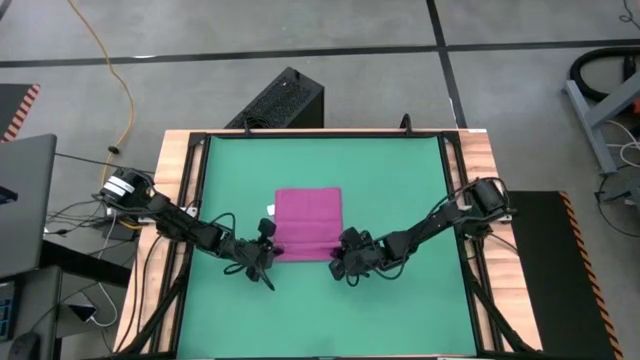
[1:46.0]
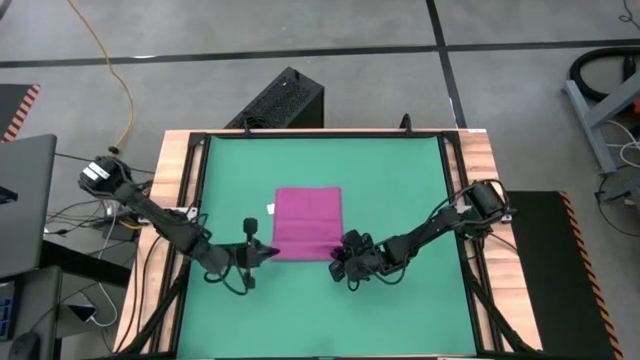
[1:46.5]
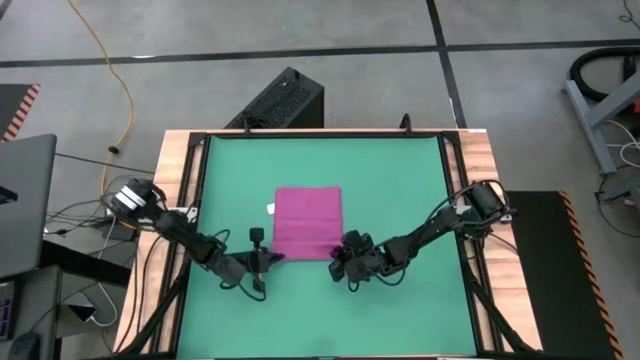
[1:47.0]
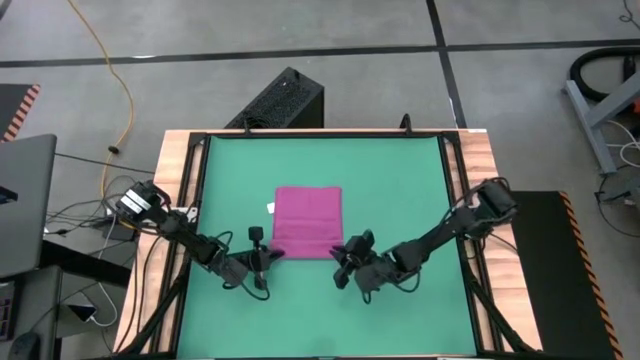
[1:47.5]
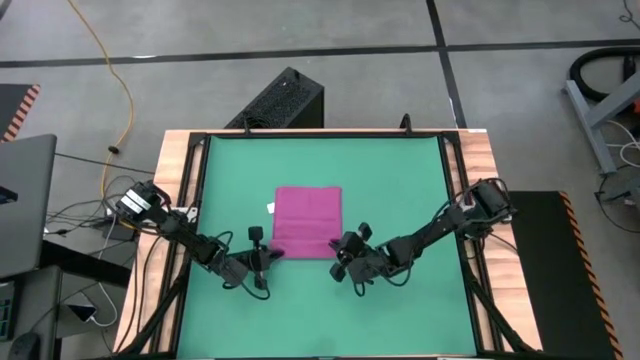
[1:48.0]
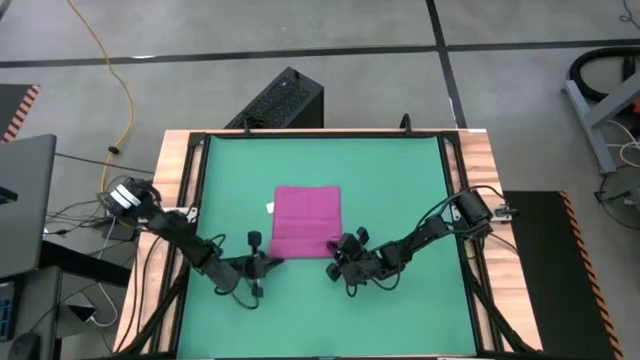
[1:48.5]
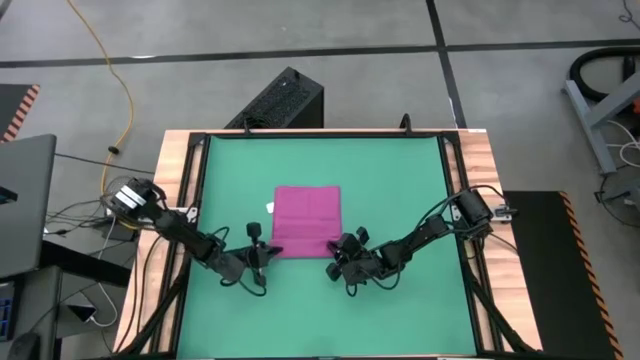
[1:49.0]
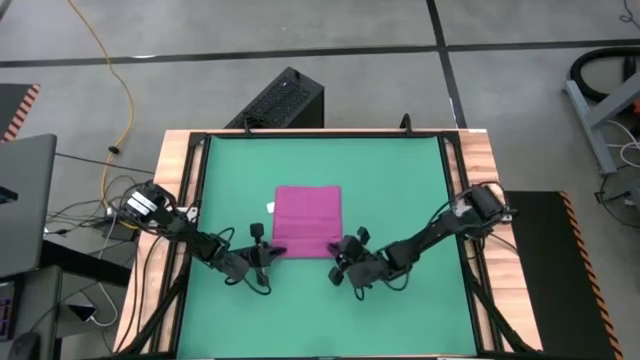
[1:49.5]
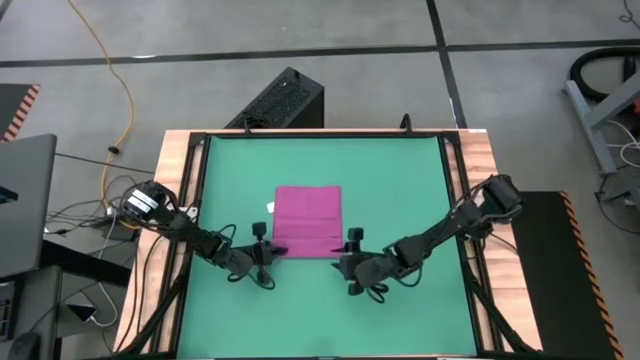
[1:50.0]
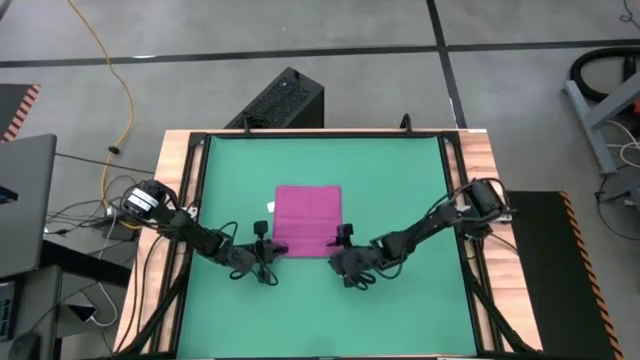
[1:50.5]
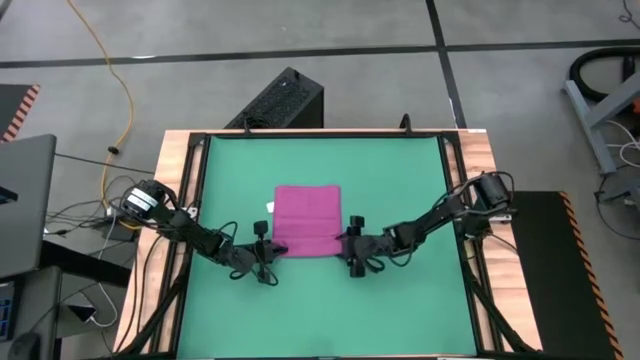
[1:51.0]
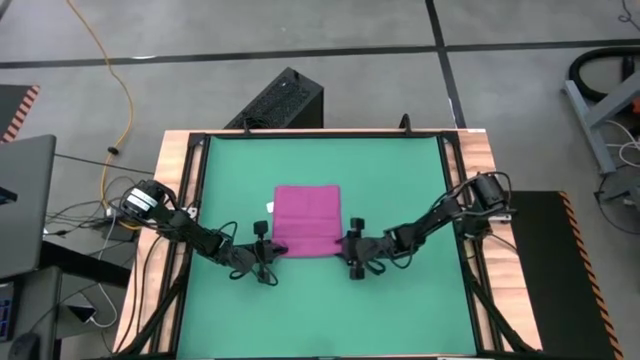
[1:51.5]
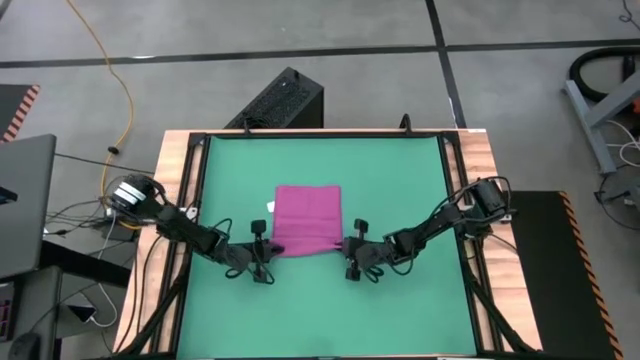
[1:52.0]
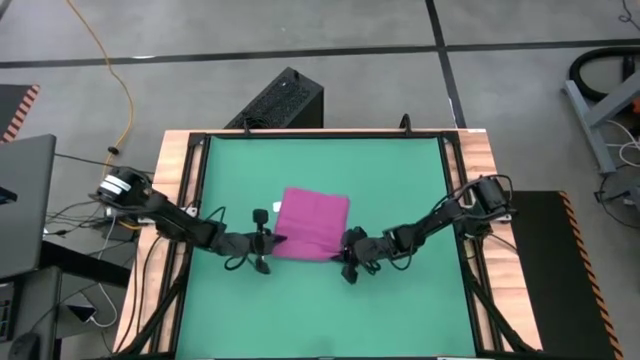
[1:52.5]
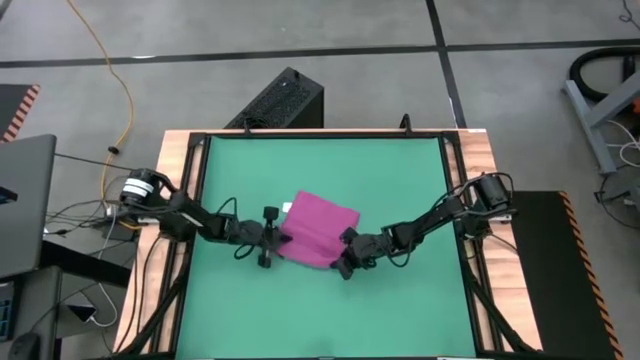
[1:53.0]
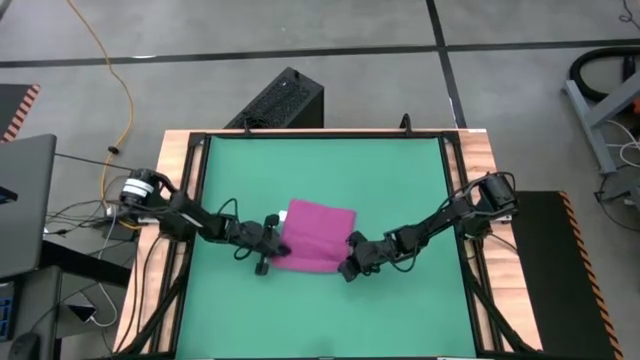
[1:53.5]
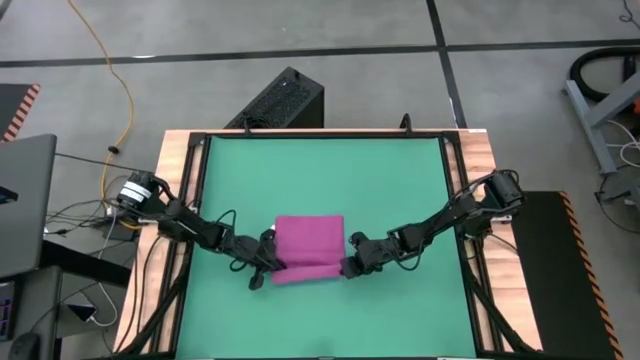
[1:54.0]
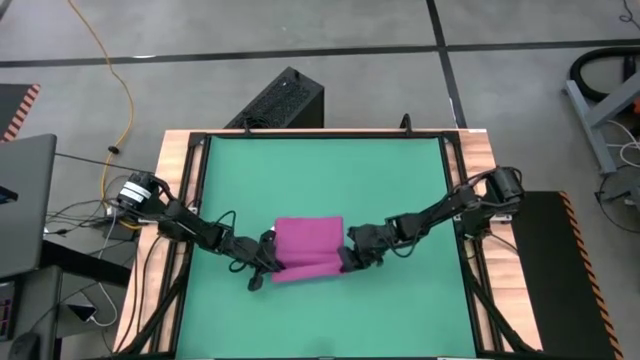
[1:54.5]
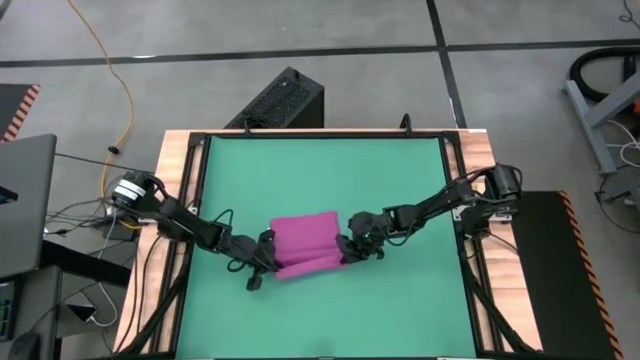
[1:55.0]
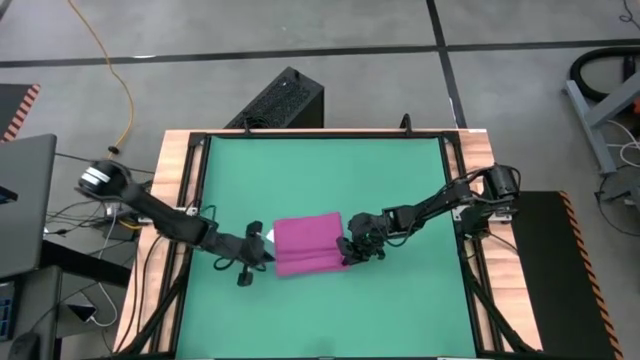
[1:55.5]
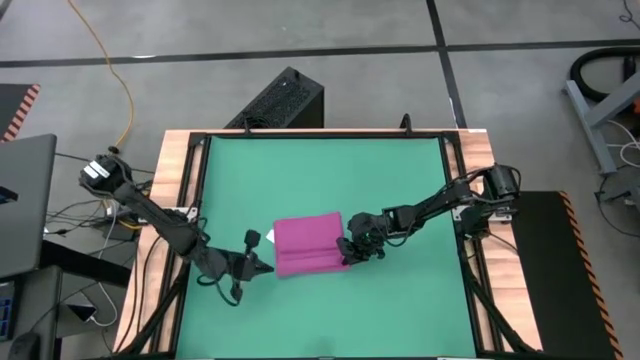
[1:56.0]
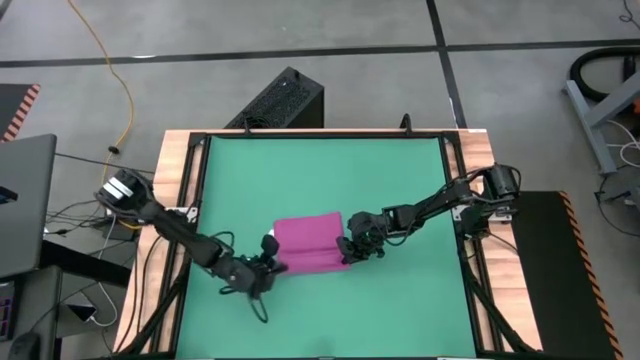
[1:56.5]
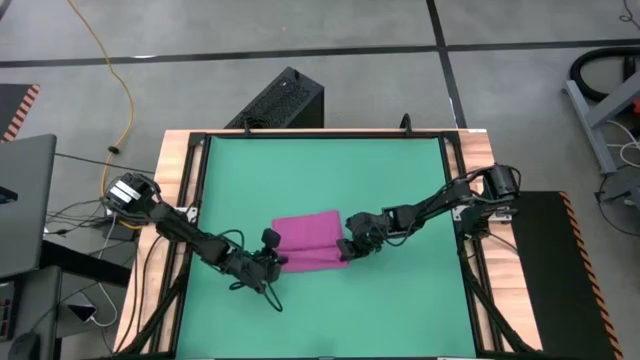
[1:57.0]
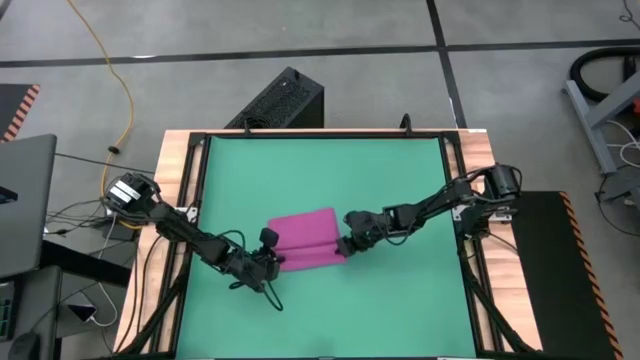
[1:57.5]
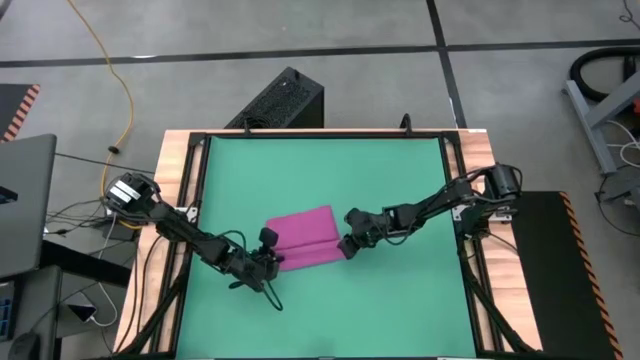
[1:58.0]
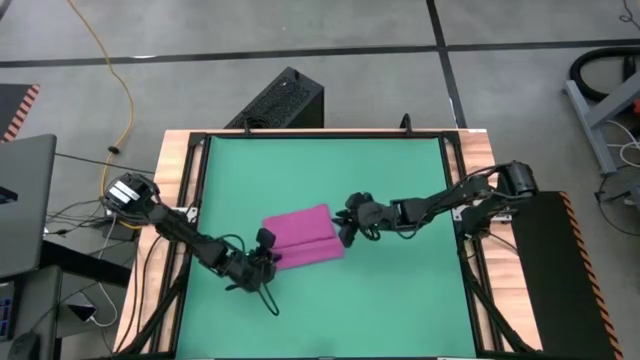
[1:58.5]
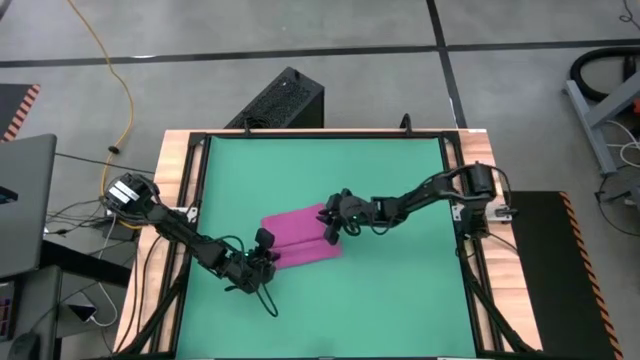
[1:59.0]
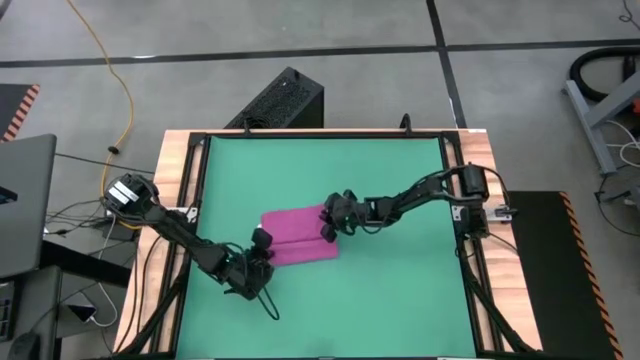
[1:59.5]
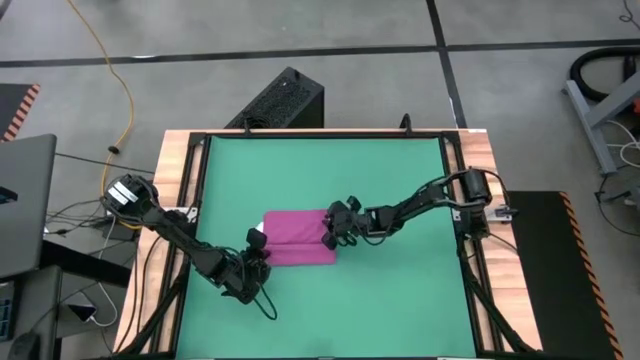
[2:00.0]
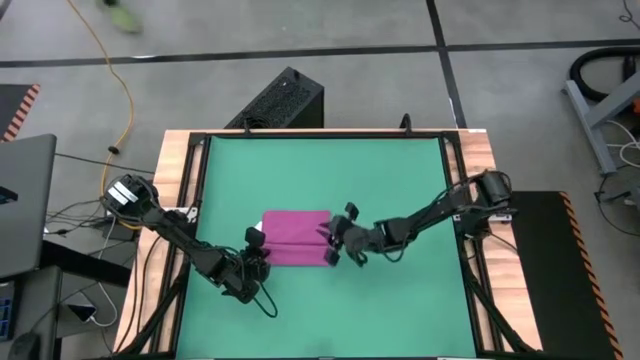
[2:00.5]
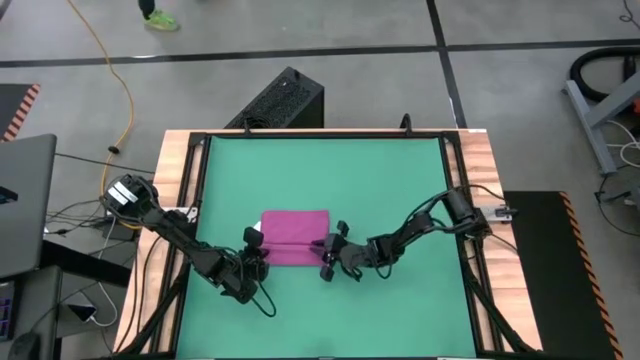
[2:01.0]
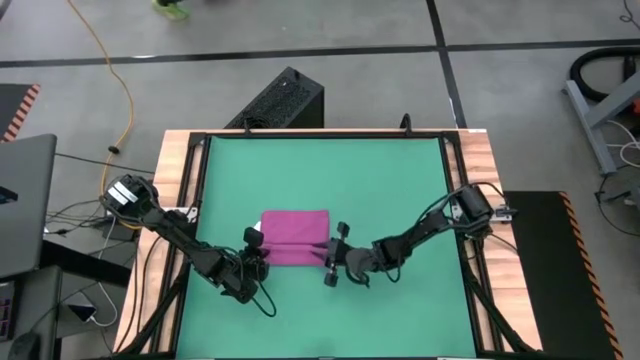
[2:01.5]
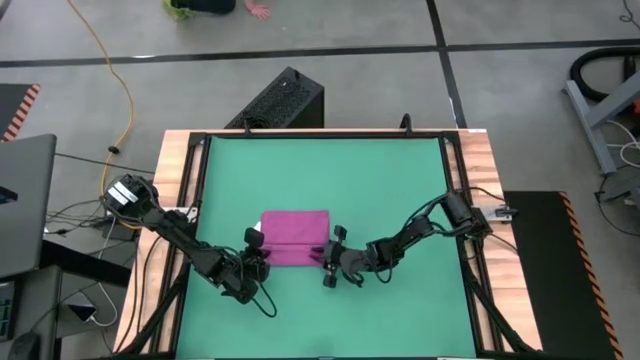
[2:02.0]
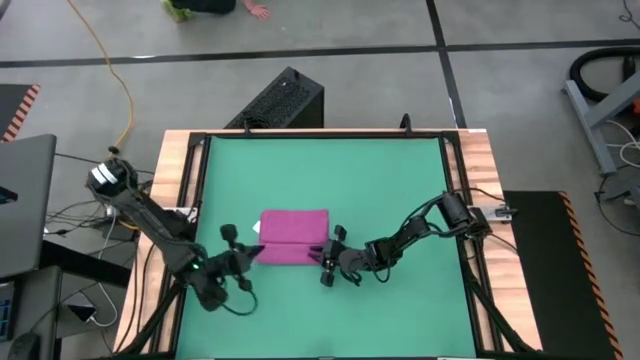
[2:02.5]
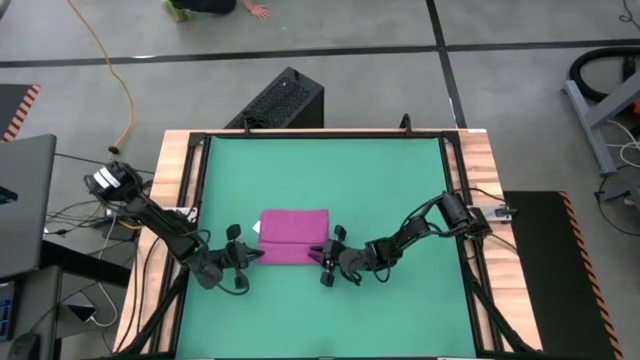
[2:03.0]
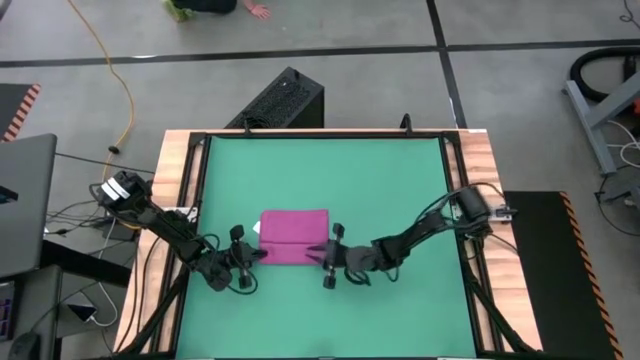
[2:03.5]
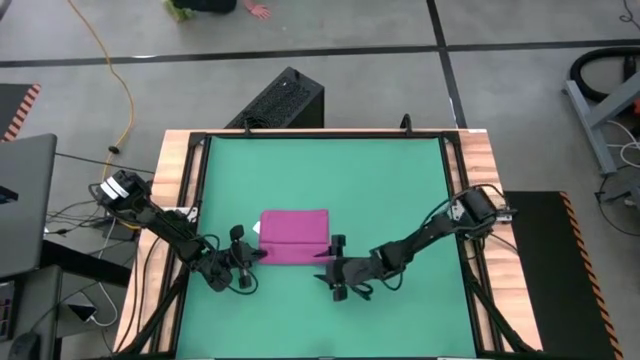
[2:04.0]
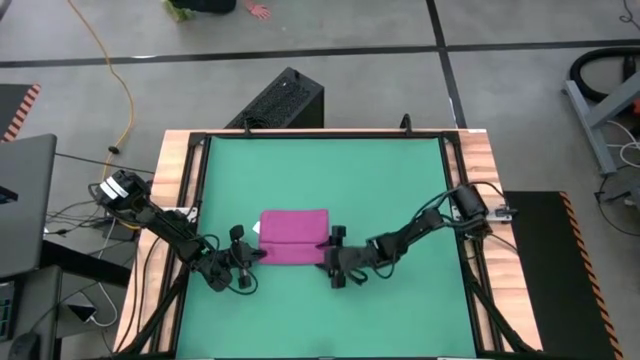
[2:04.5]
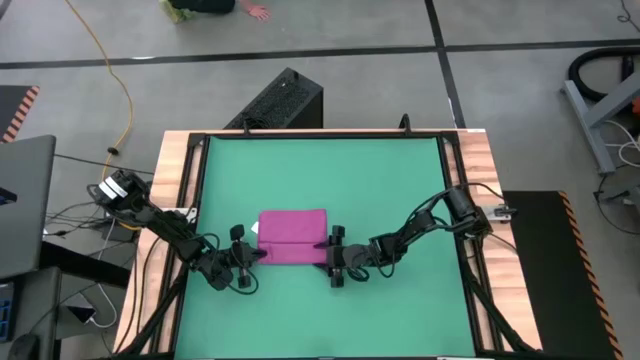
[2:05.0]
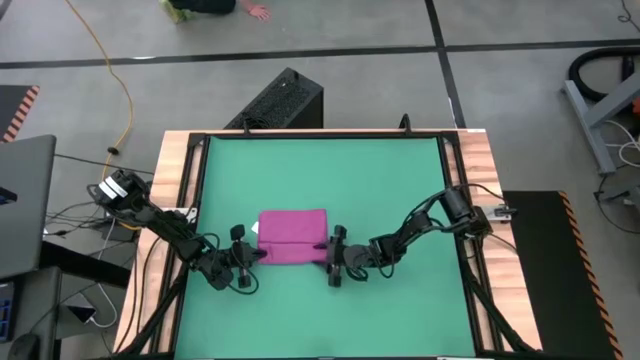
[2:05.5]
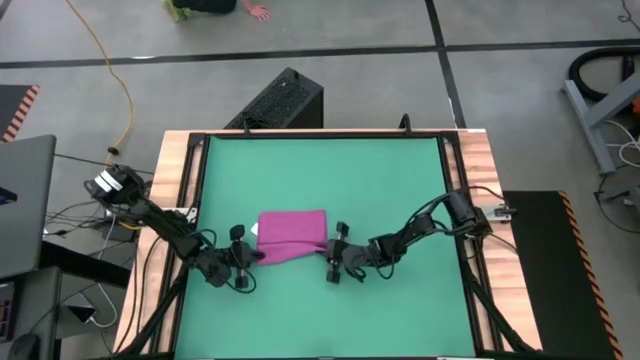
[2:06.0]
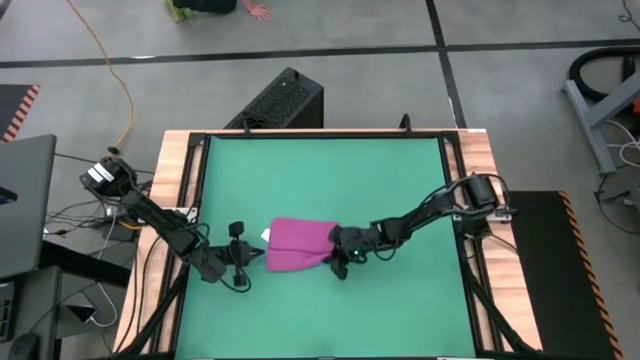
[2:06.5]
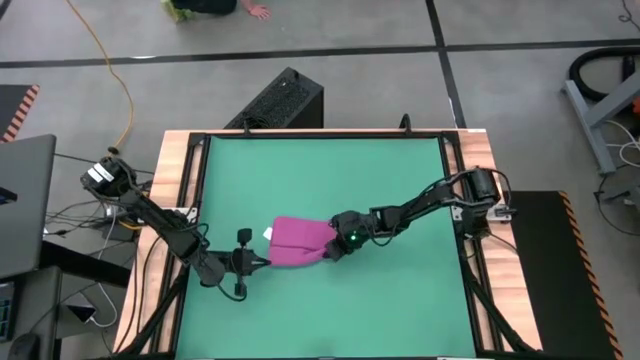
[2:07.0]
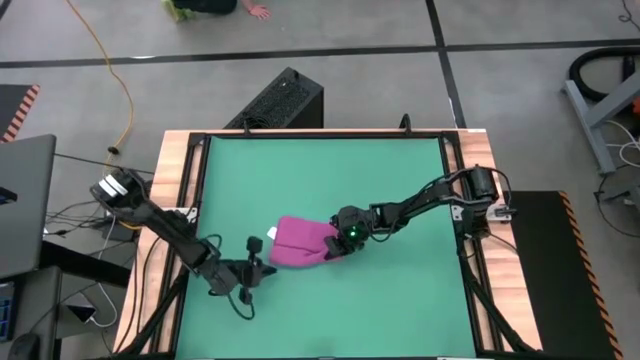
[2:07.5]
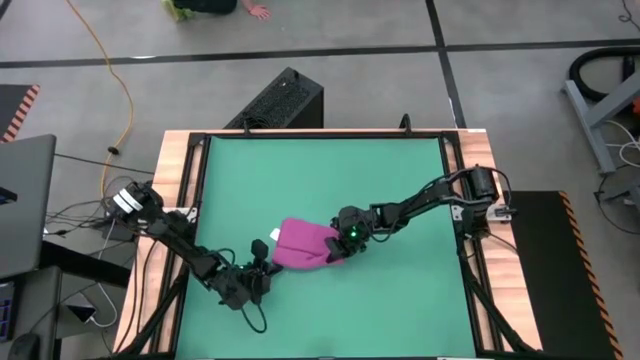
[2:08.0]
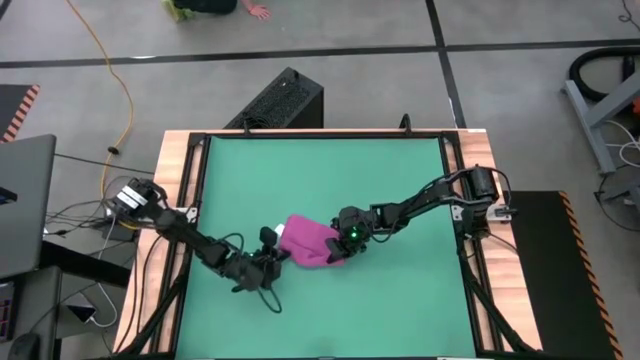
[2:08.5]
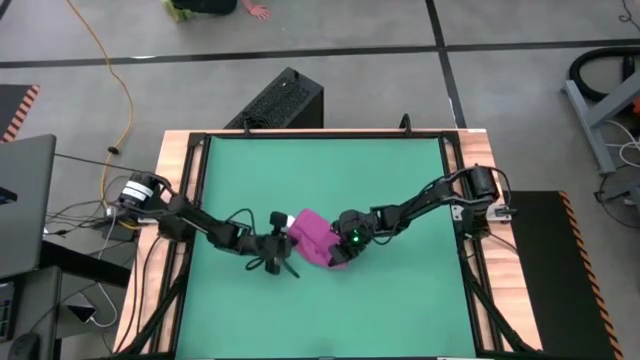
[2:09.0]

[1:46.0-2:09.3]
Task: Roll towel into tight, uniform cylinder
Roll the pink towel
